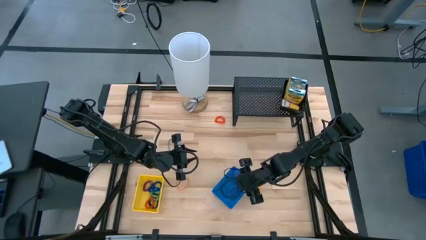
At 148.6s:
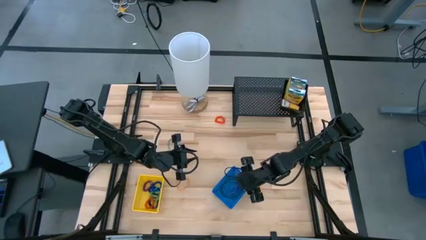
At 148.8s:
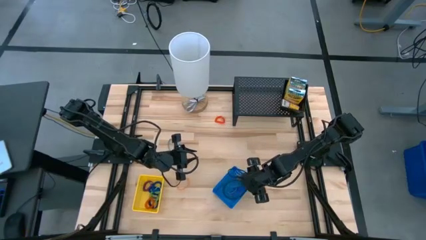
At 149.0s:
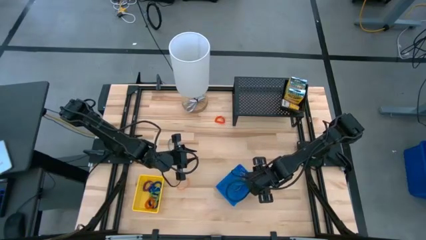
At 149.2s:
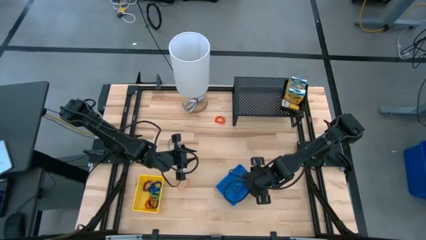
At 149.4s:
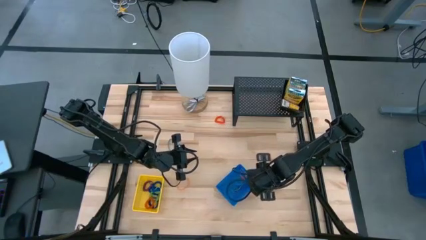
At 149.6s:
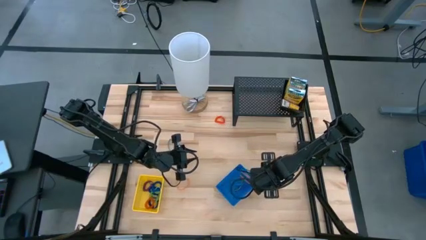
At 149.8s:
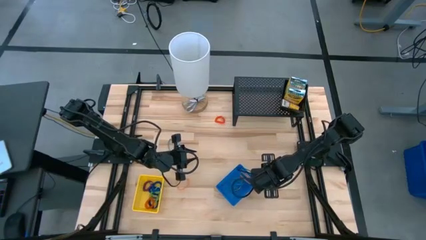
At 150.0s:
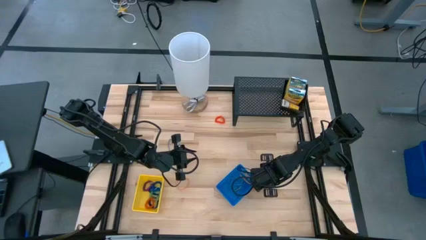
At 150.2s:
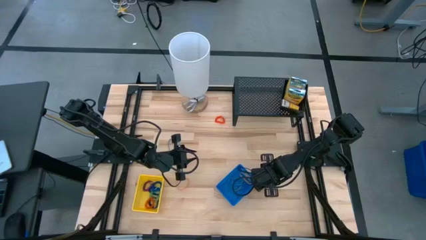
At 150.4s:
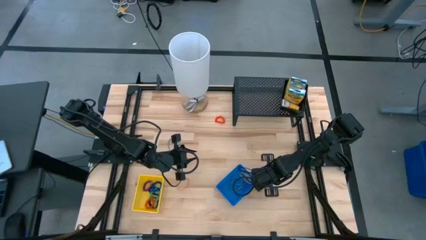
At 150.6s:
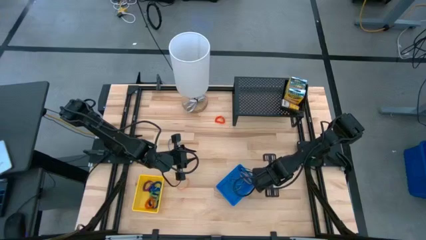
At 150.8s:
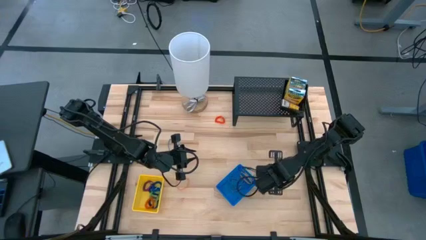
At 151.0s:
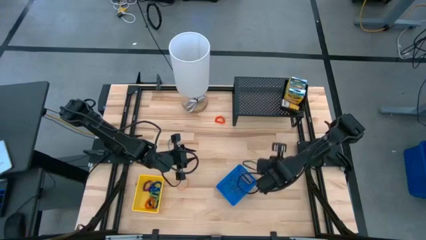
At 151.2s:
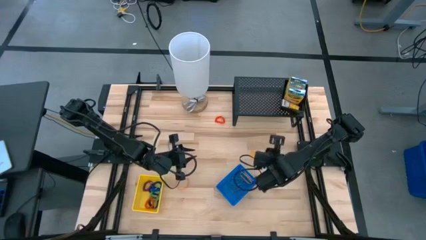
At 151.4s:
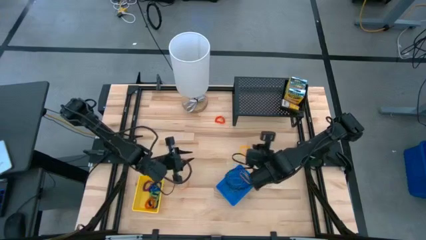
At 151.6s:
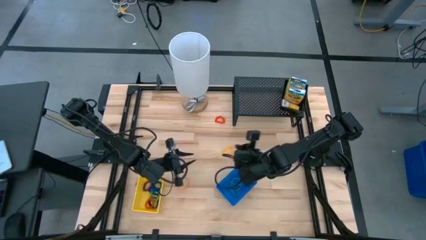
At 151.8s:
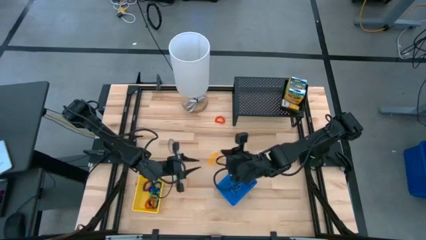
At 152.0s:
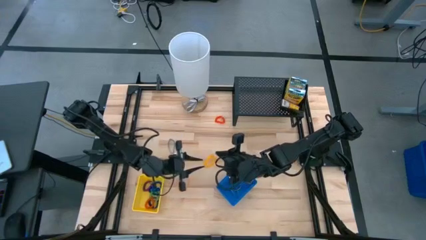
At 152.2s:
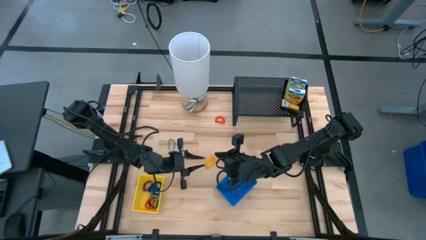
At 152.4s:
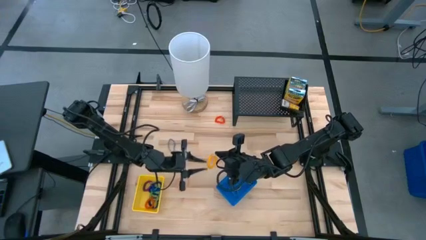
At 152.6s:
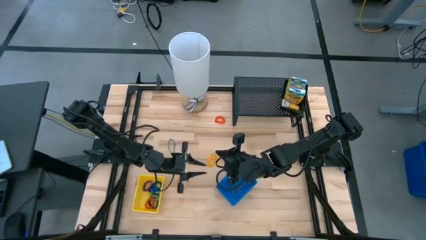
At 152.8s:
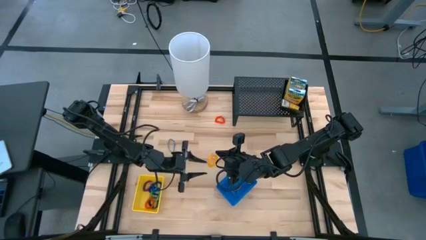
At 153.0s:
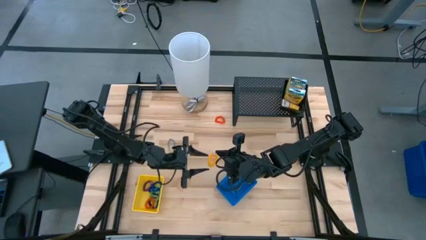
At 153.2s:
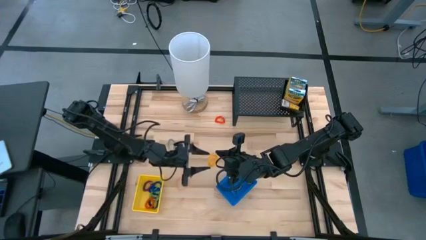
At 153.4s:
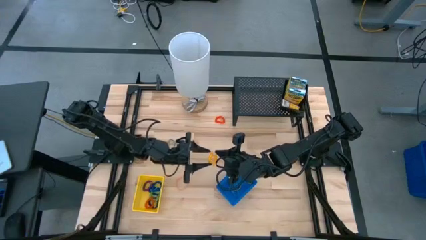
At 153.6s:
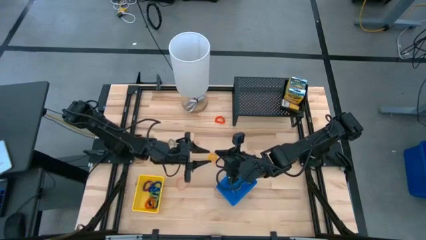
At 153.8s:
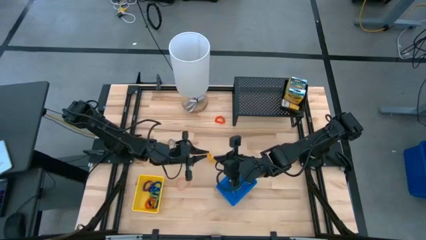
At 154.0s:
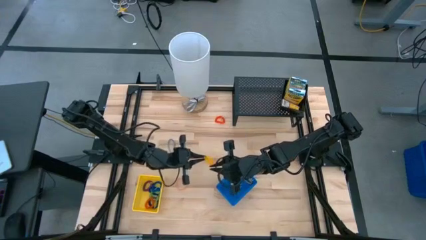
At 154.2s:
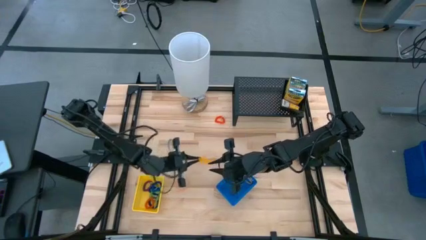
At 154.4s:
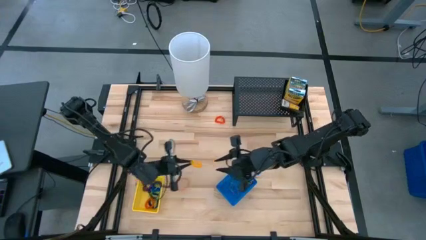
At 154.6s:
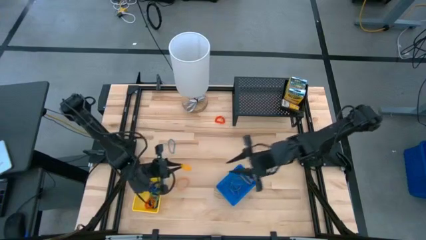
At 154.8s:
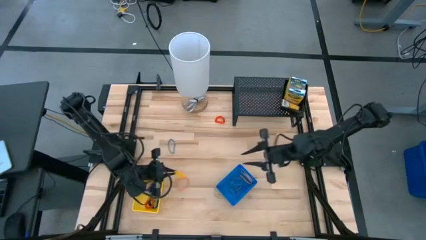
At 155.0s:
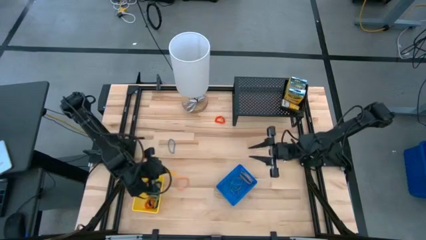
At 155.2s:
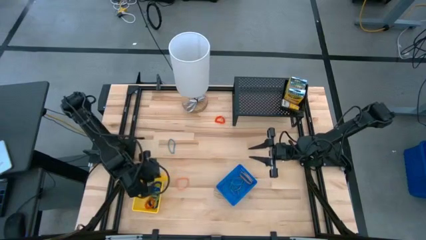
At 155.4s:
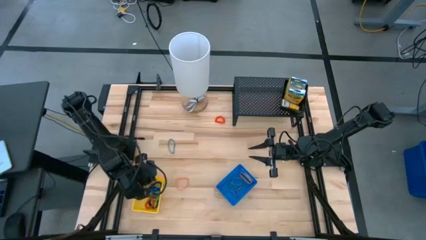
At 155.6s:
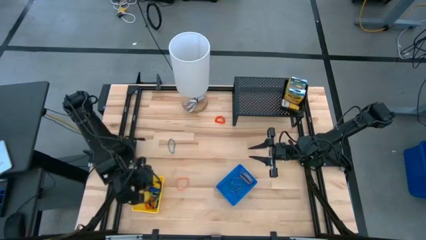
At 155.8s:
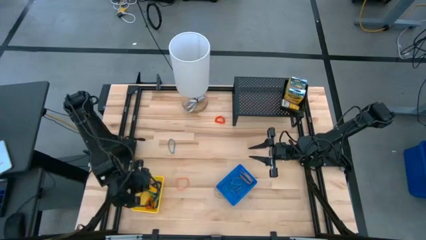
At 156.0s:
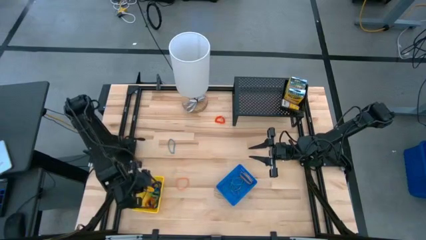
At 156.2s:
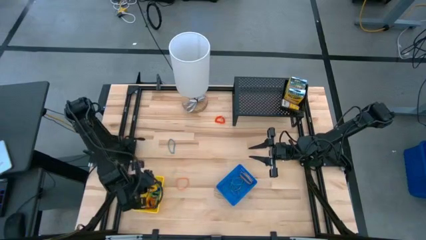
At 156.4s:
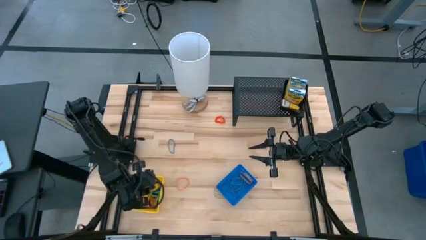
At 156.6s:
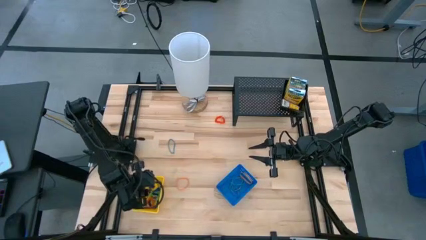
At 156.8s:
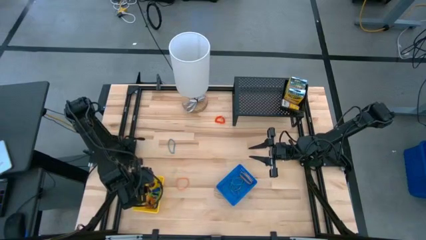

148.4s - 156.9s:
Task: Pick & Place Office Desk Supplies
Put the yellow spring keychain into the yellow bin

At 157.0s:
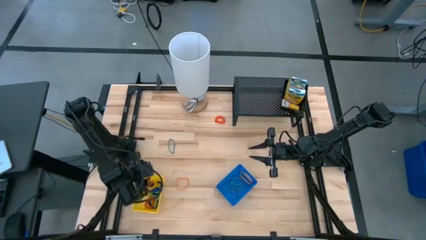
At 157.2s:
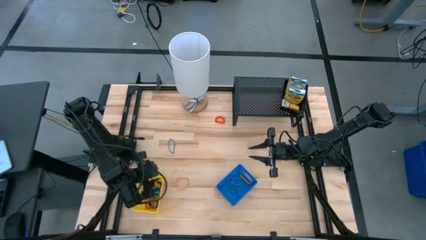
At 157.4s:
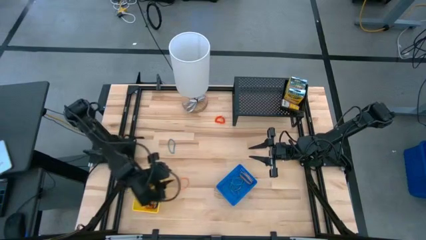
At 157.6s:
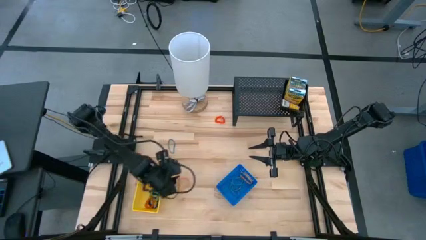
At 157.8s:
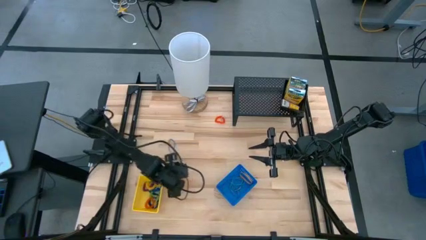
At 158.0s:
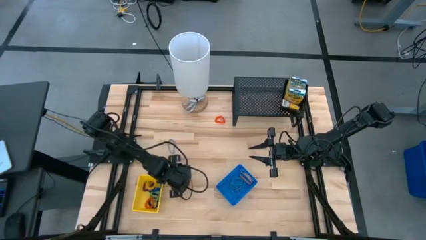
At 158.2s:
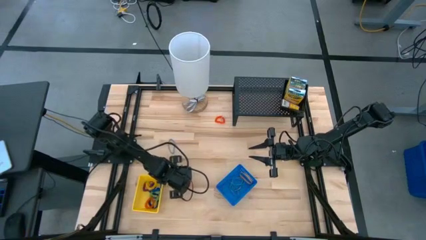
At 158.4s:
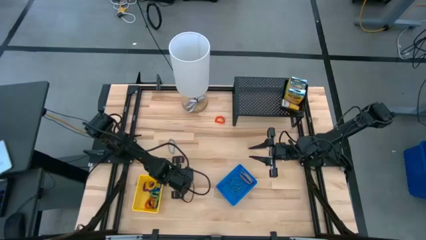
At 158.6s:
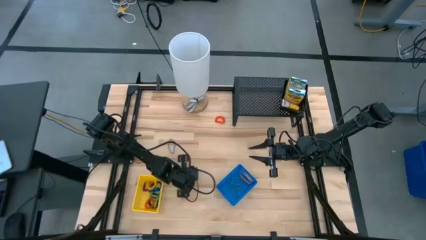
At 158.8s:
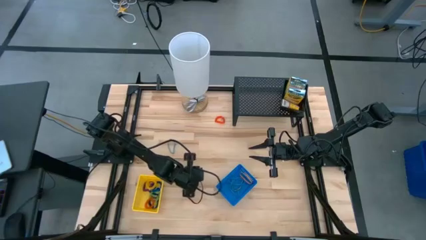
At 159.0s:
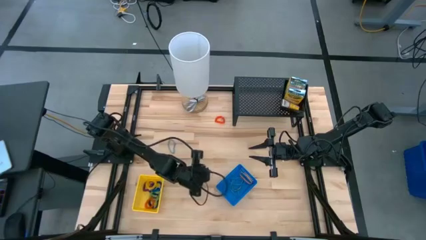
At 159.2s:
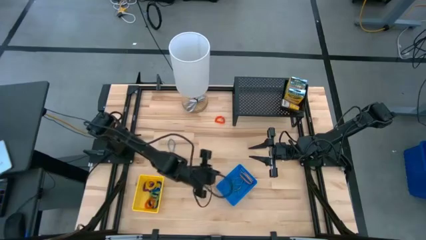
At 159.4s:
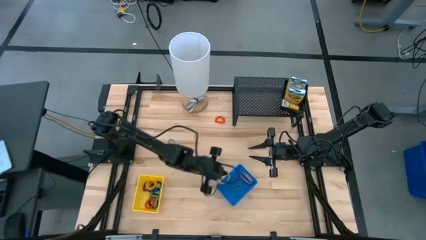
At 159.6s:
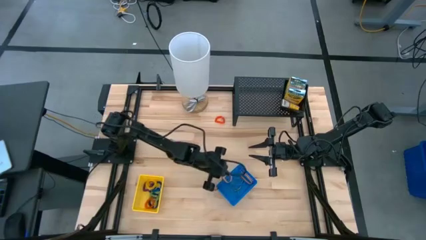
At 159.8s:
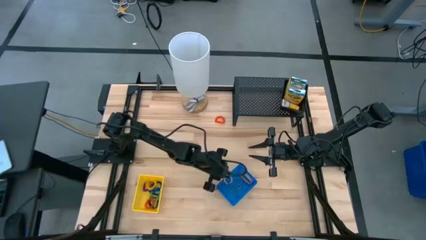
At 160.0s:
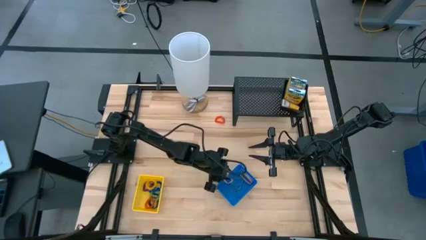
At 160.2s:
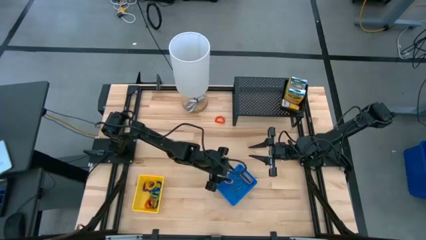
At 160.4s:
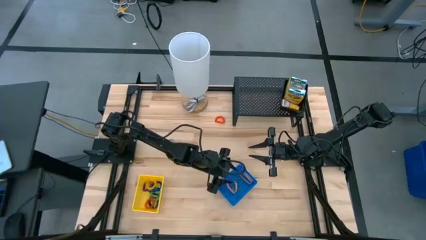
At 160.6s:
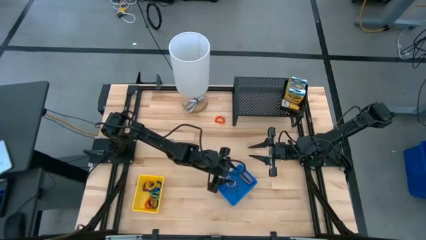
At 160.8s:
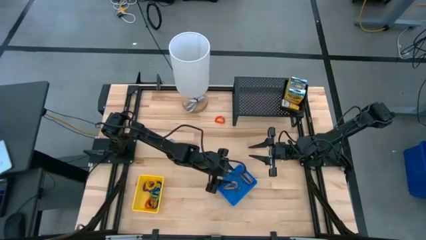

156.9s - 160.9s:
Put the orange rubber band into the blue bin

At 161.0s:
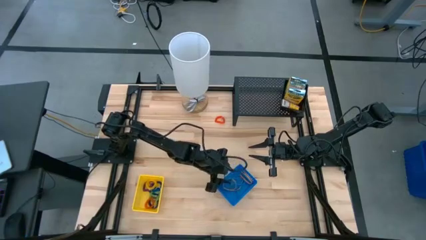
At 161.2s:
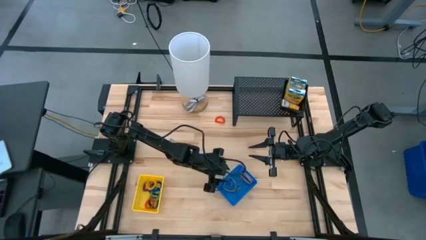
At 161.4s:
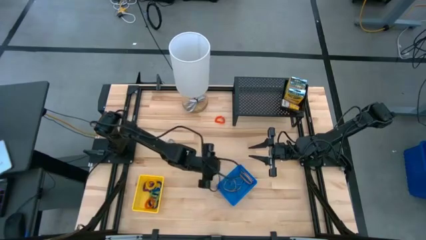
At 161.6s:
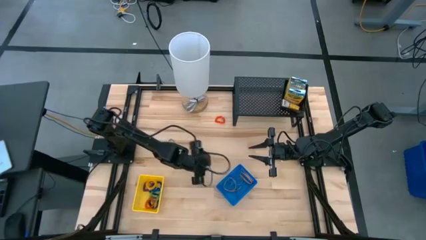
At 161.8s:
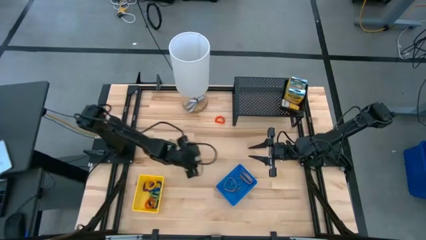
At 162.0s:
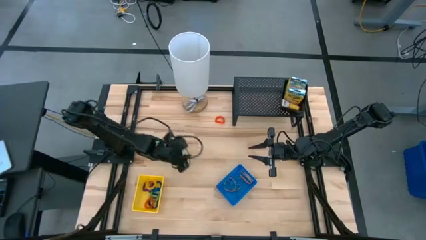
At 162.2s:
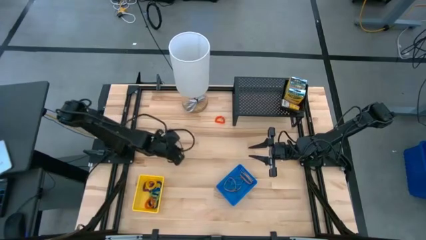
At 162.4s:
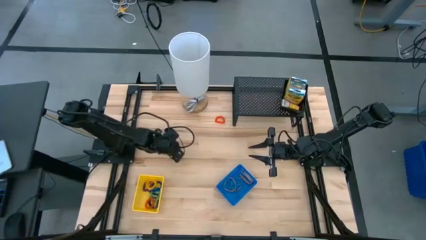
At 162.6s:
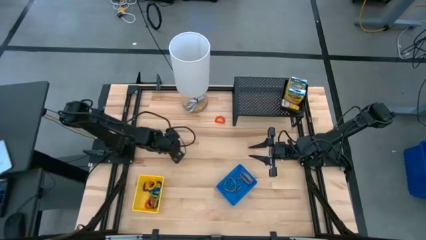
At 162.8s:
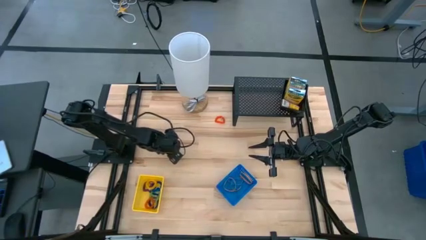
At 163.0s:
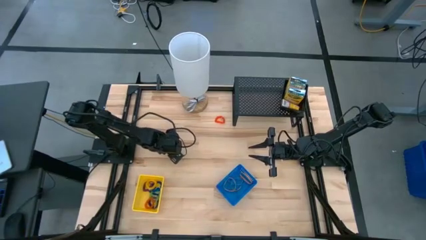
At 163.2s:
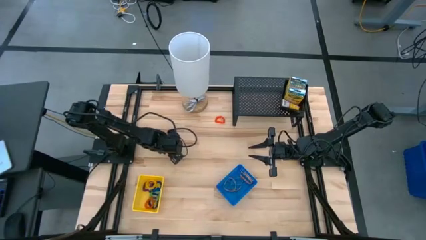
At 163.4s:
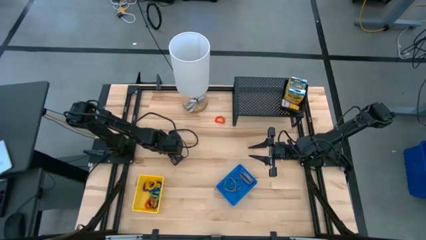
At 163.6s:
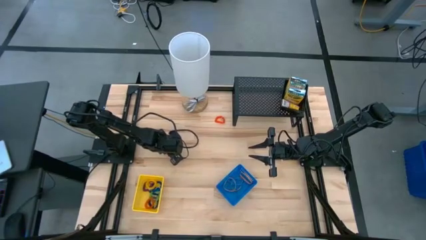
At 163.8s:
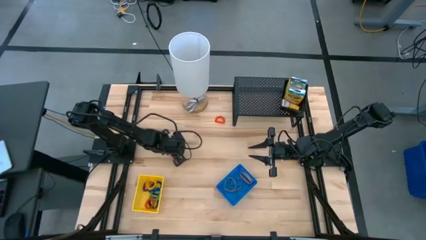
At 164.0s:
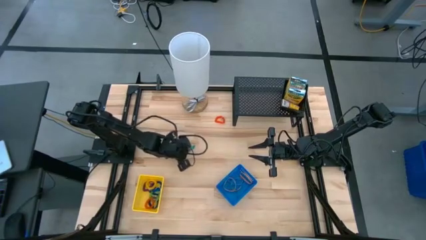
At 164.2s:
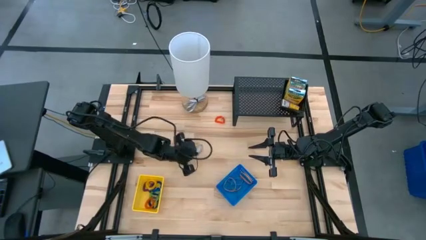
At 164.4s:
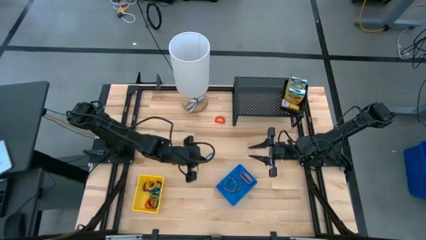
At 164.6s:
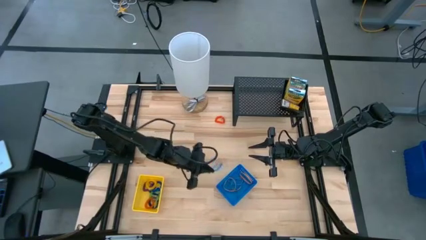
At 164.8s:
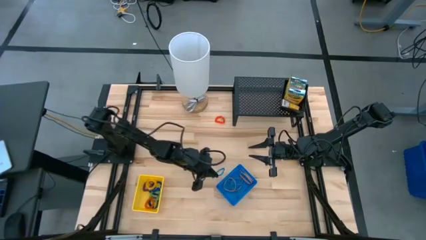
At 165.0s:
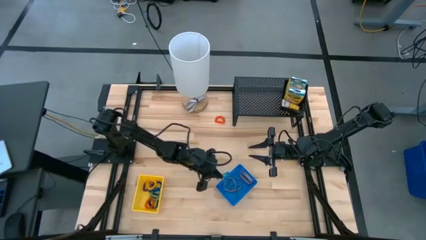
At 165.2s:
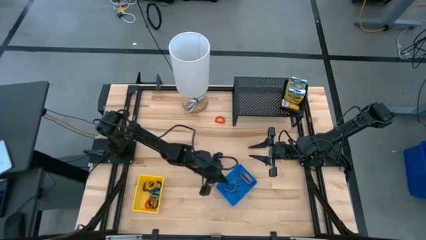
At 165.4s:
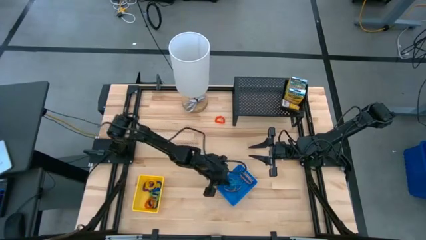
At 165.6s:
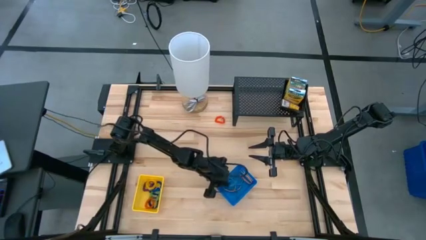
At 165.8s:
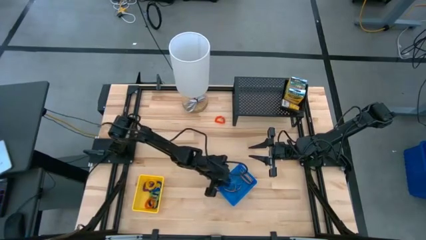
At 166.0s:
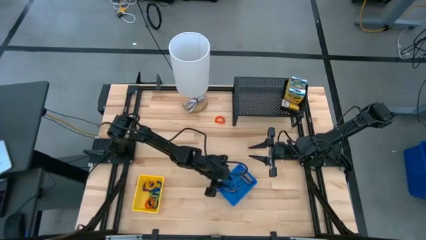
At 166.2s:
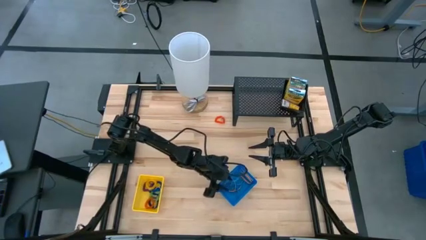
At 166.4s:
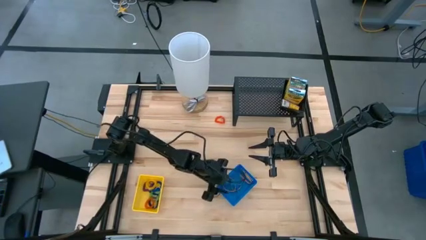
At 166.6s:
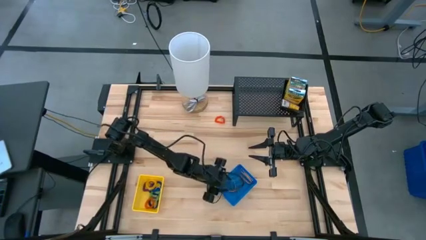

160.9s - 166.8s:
Put the blue rubber band into the blue bin
